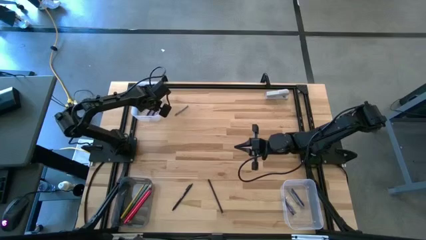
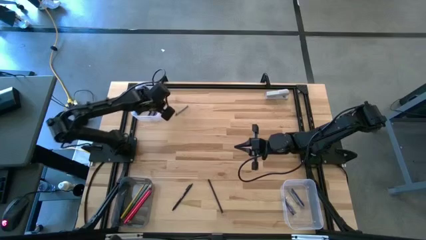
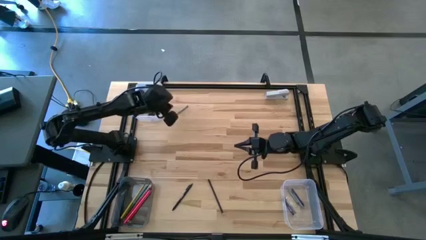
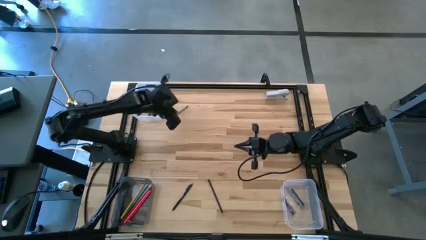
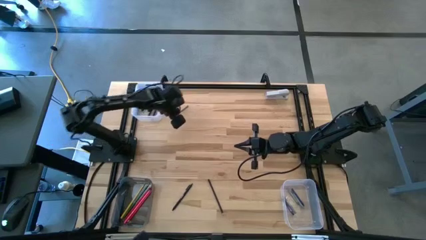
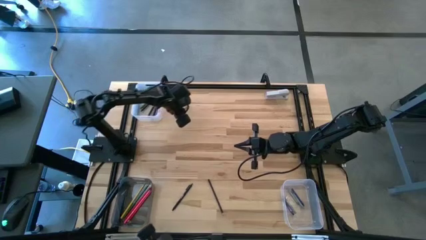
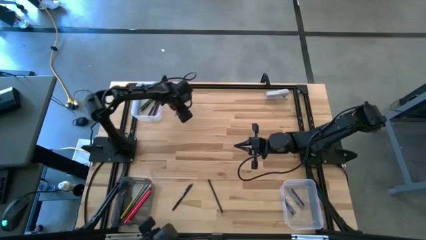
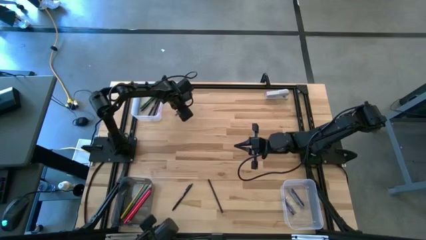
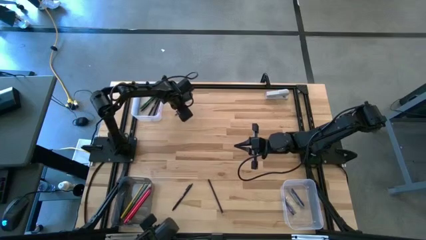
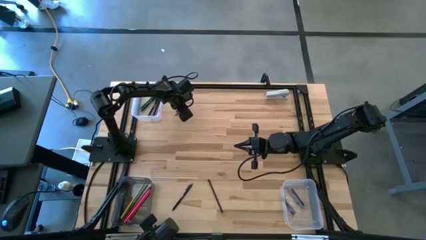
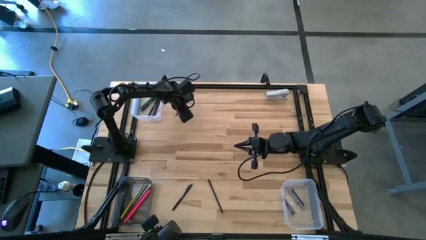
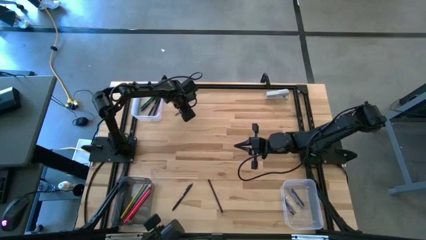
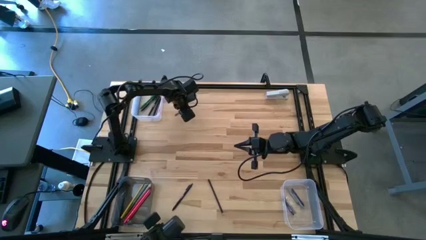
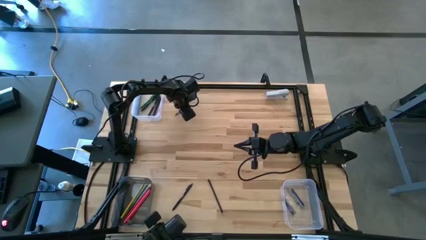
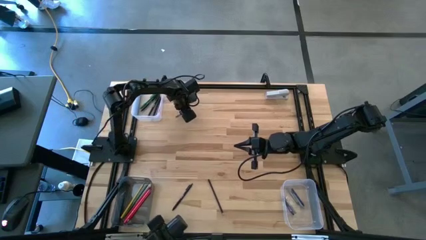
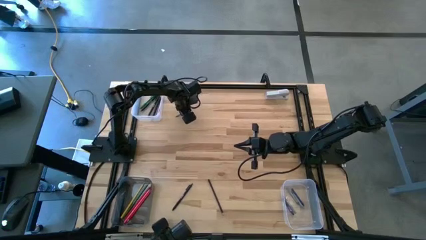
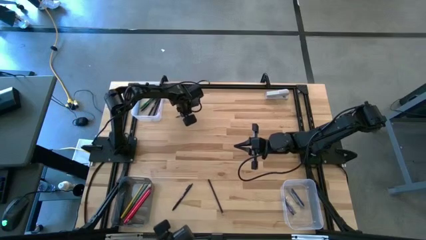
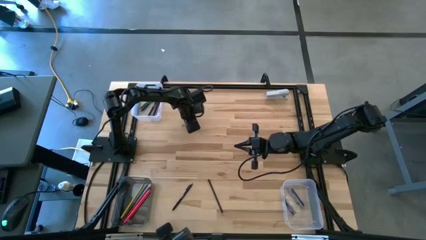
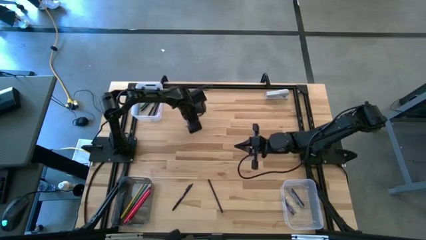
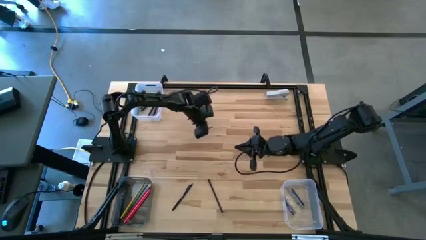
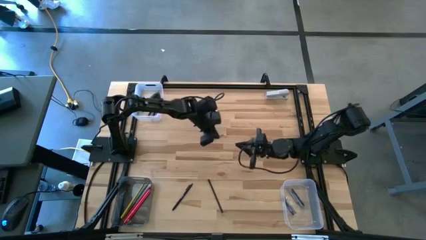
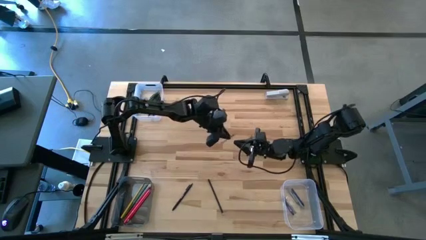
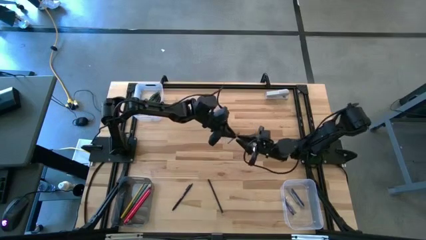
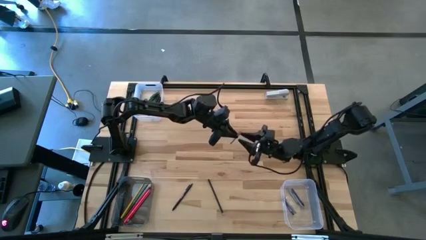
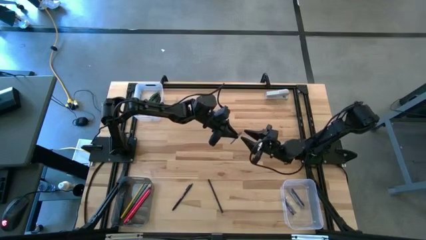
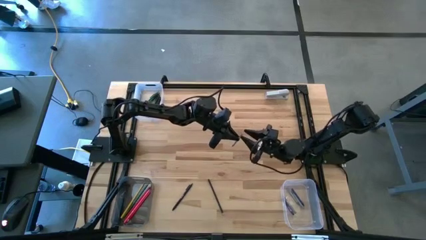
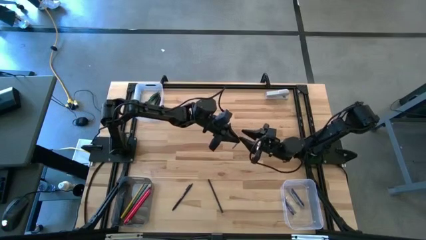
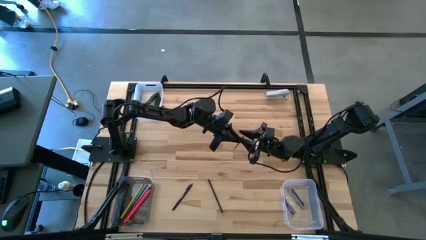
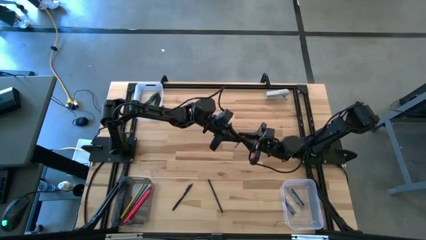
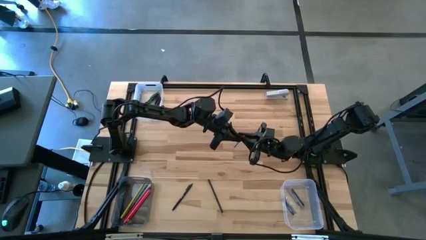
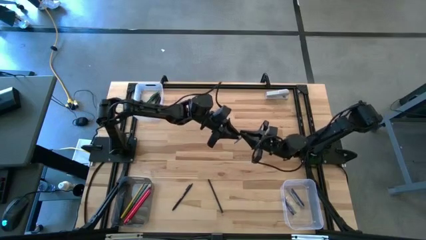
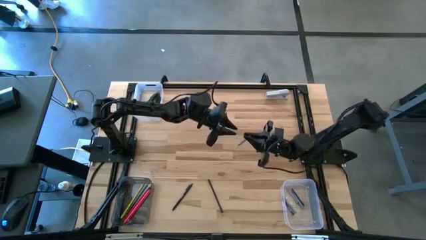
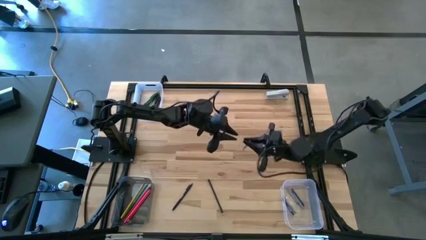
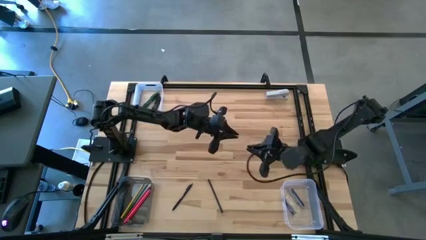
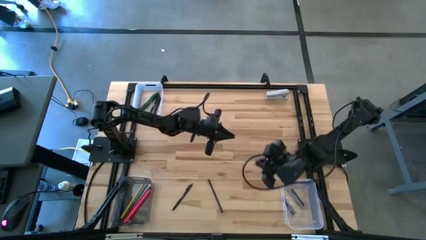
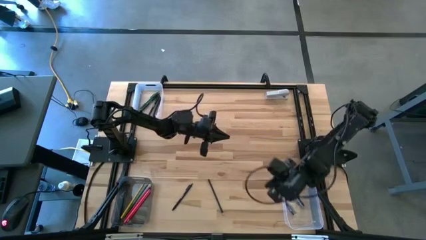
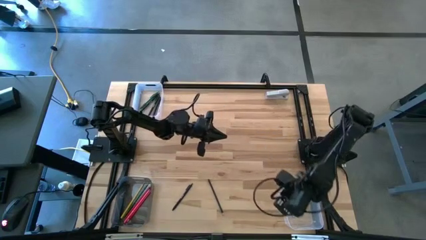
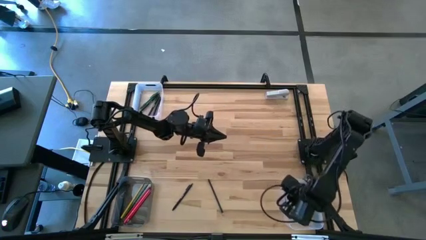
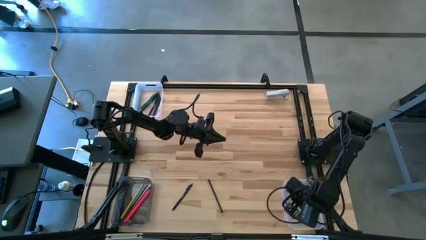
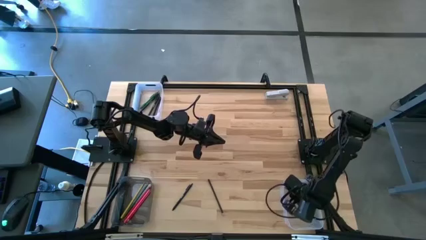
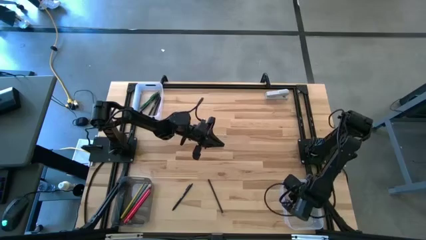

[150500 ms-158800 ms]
Task: Sort crayons/erasers/pens/pencils in bins
Put the gray crayon into the bottom transparent bin

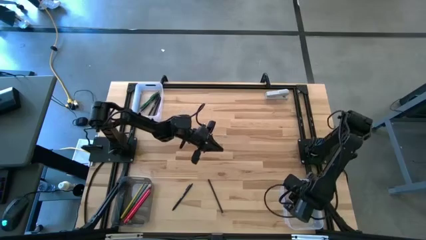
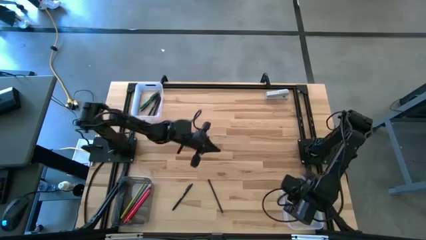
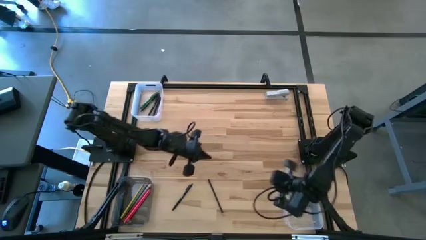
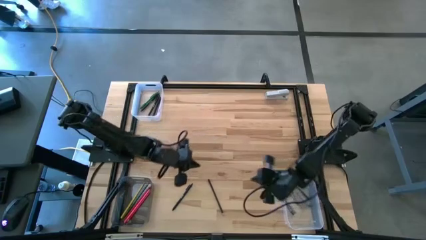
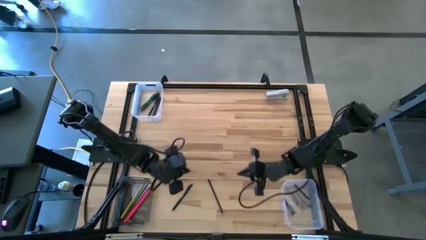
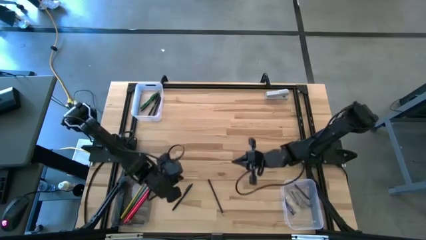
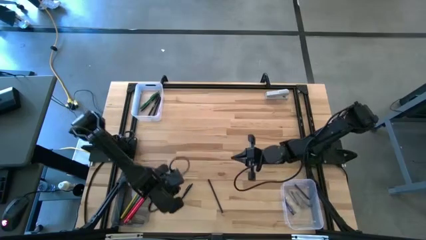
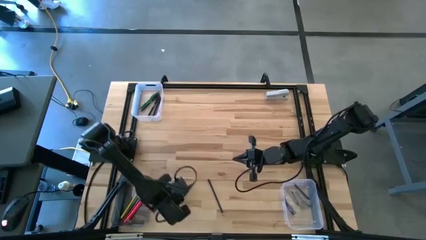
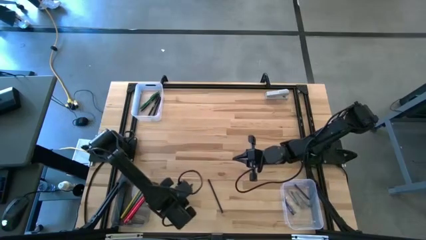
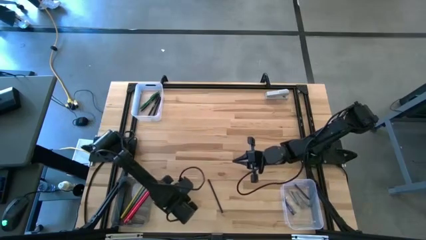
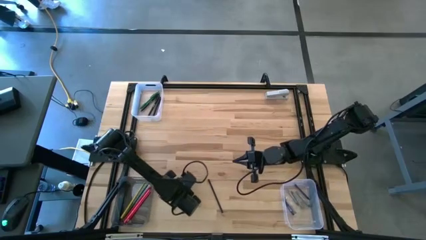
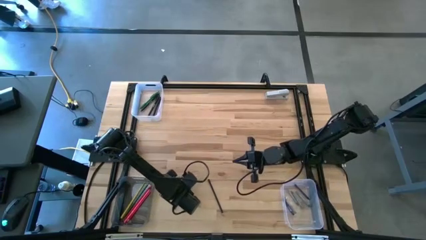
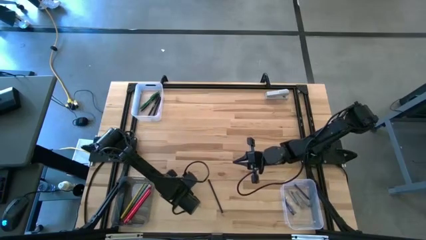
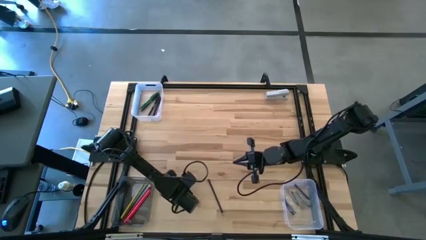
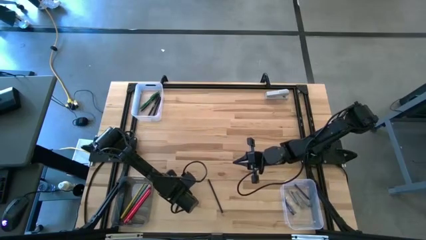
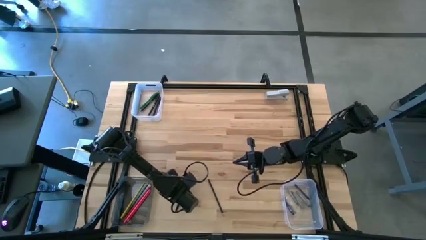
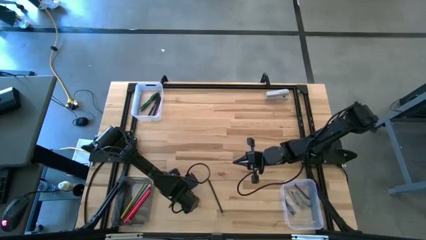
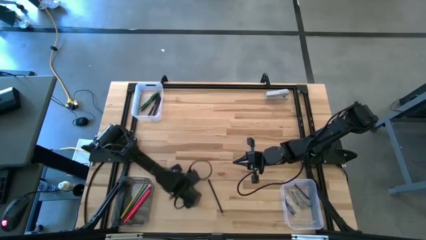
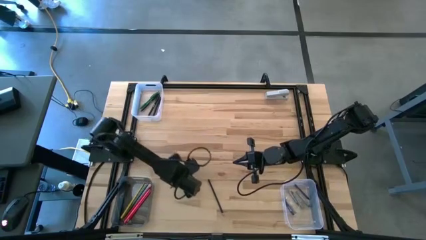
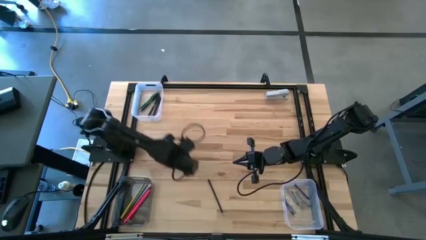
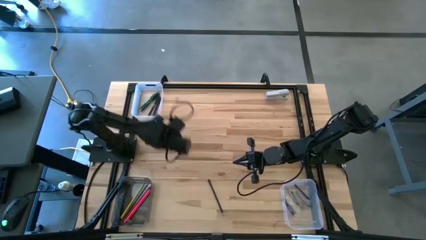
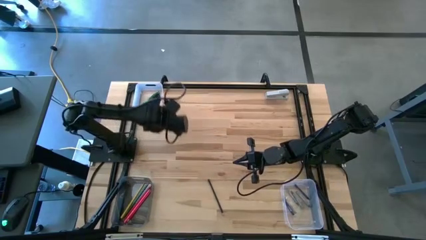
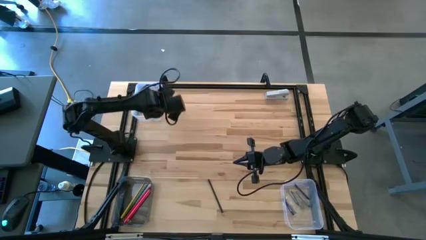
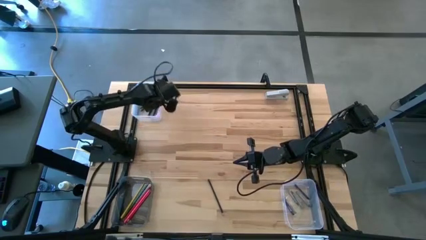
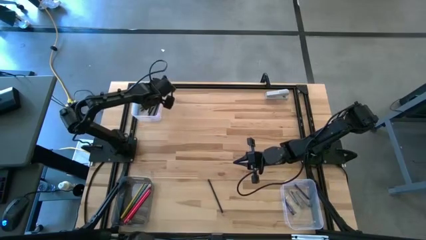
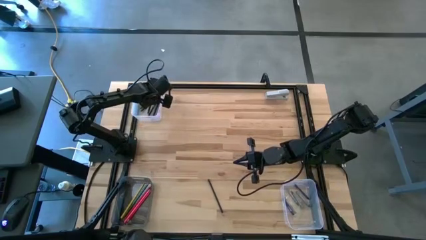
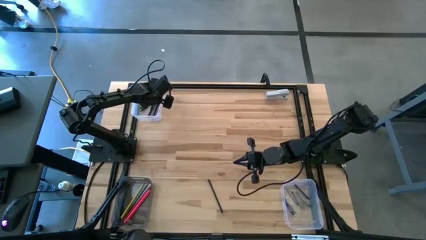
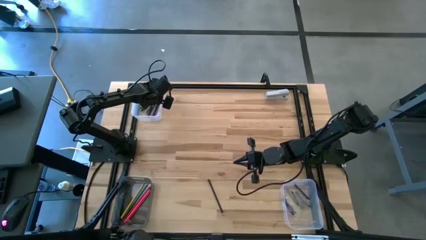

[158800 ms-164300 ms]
Put the black pen into the top transparent bin

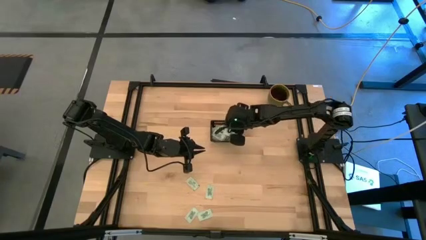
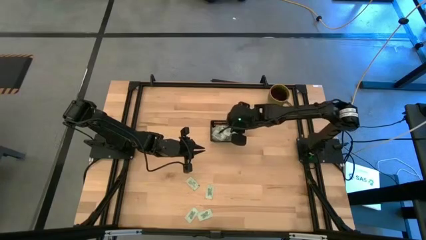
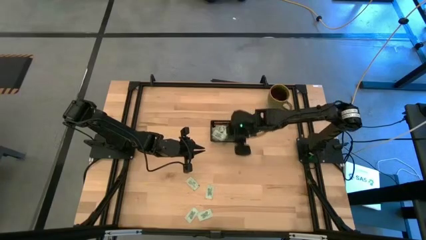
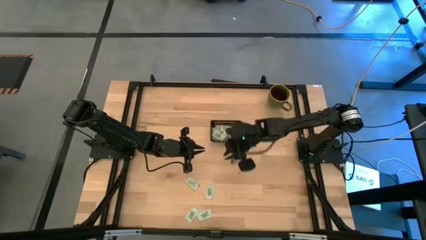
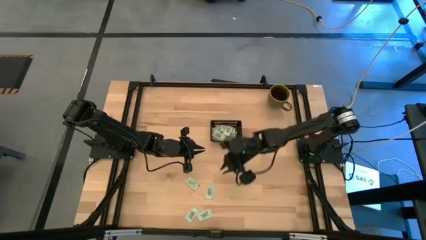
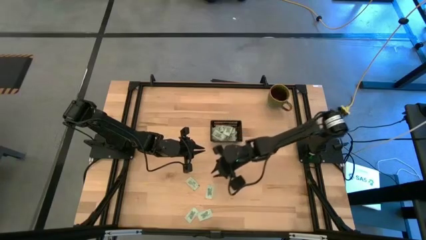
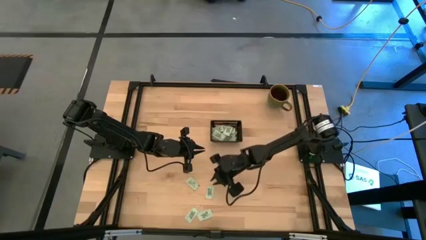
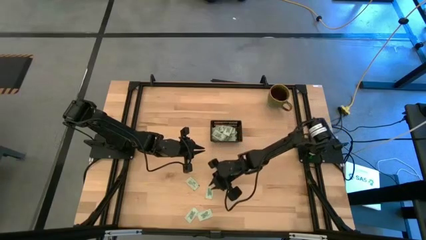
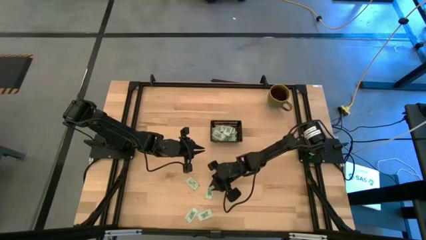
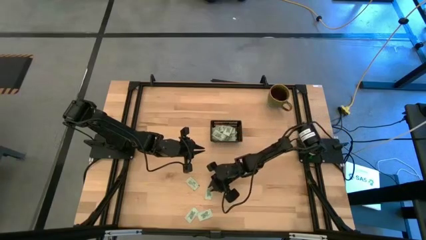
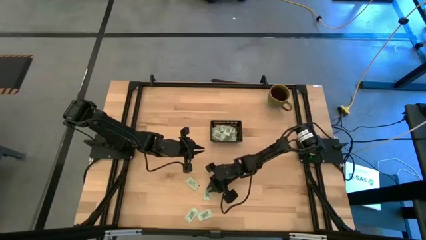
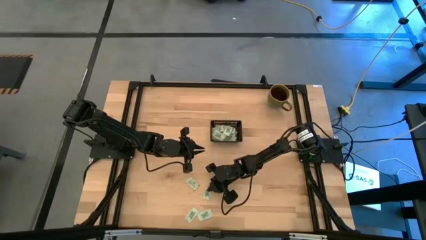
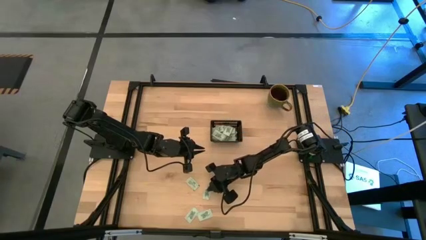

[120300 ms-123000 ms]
Task: Pick and place Stevia / Truvia into bins
Put the stevia packet into the black basket
